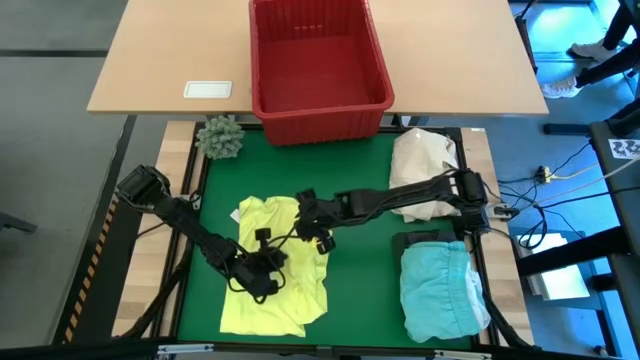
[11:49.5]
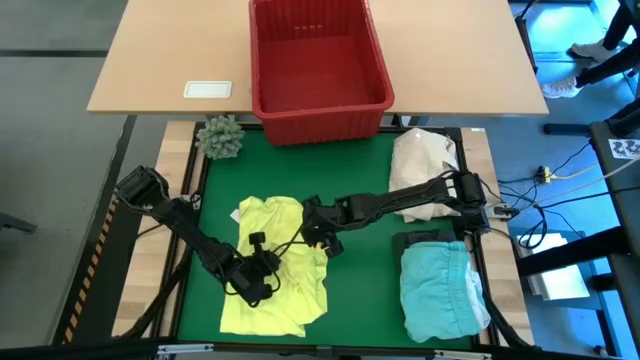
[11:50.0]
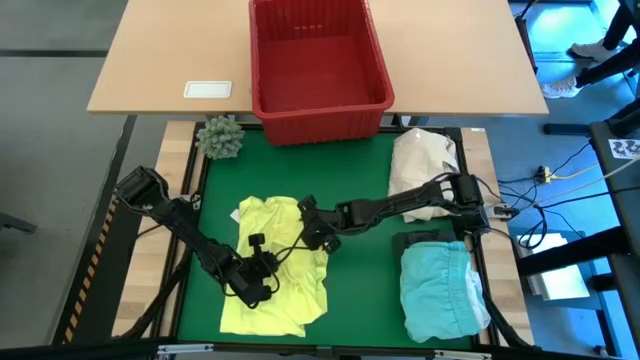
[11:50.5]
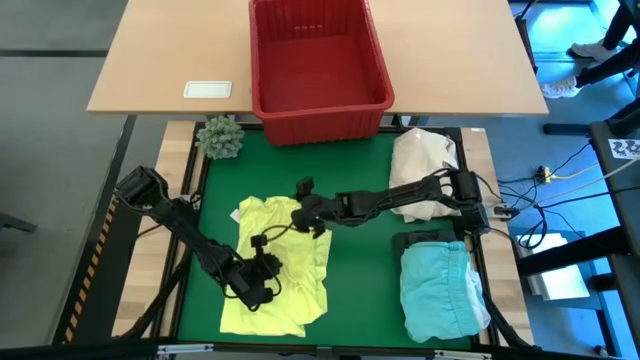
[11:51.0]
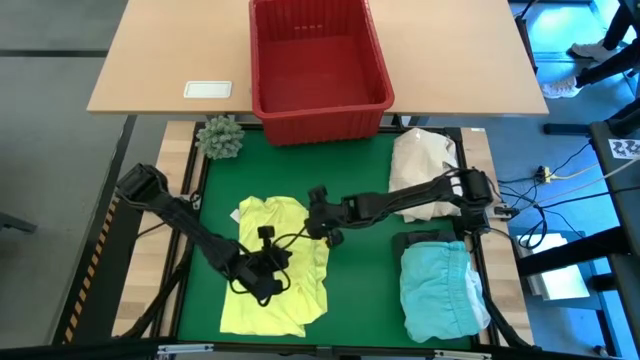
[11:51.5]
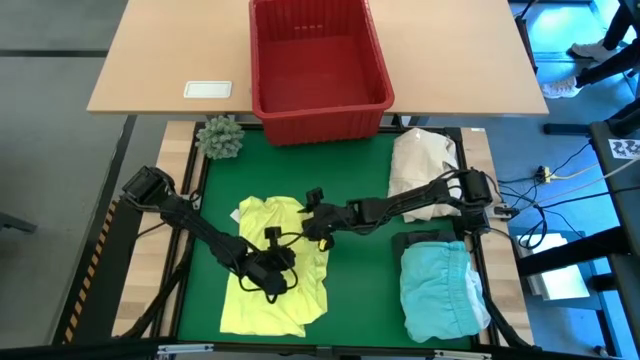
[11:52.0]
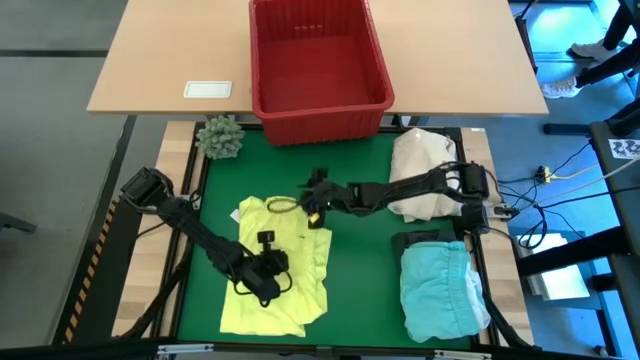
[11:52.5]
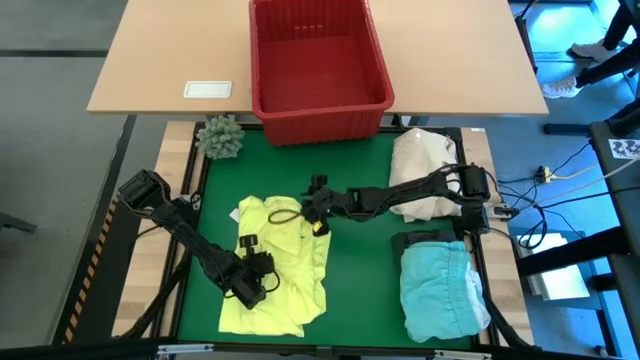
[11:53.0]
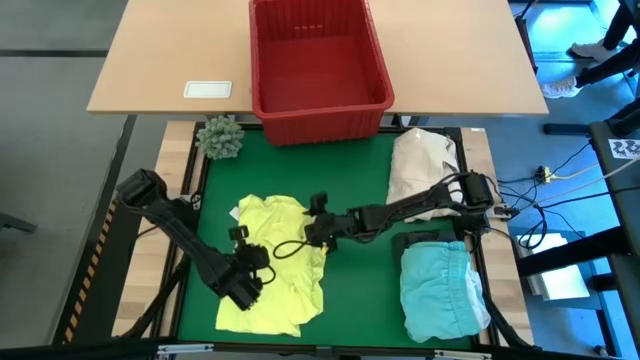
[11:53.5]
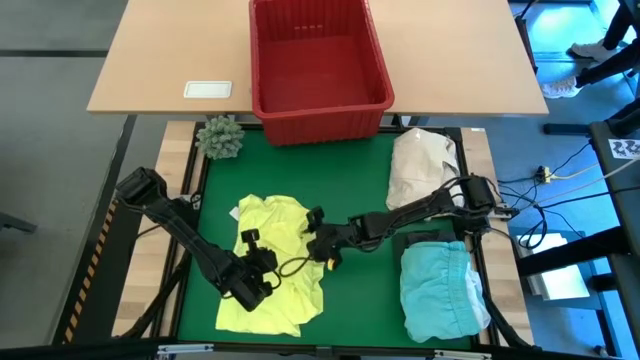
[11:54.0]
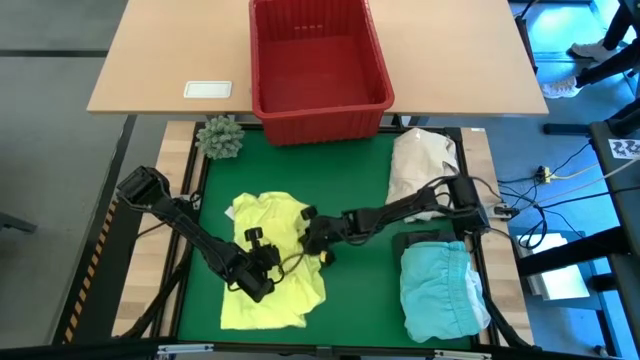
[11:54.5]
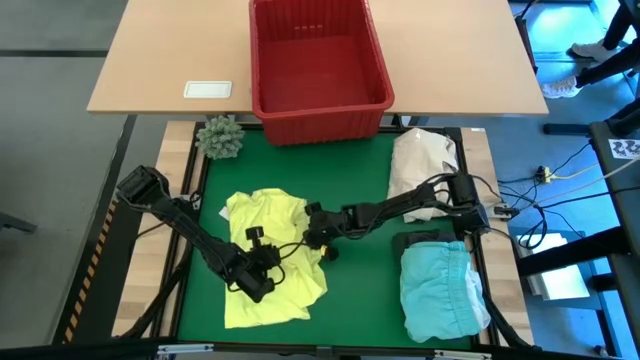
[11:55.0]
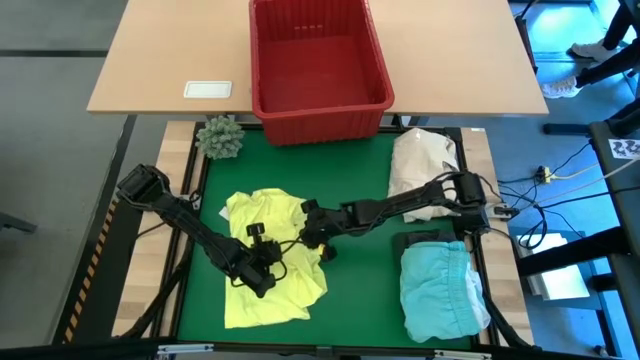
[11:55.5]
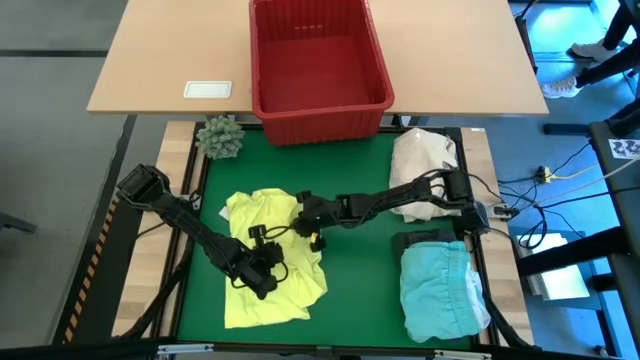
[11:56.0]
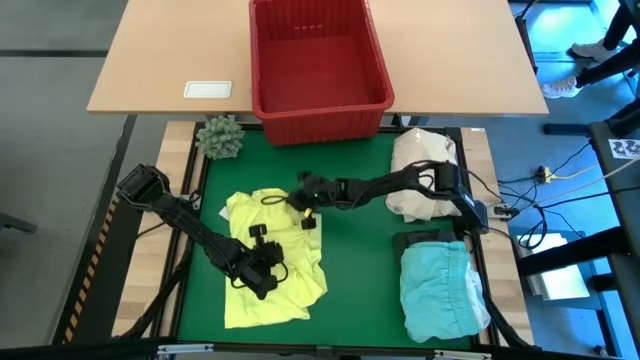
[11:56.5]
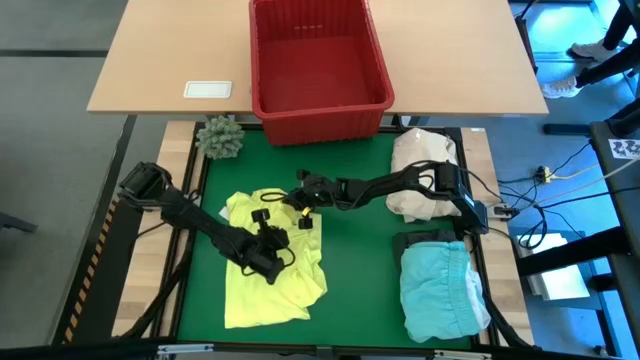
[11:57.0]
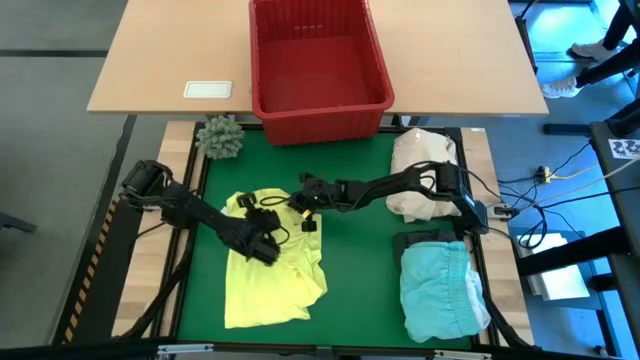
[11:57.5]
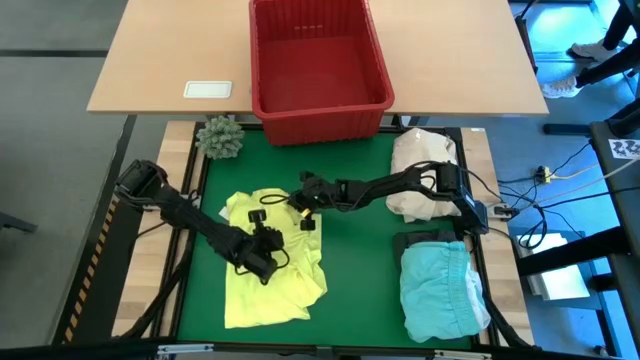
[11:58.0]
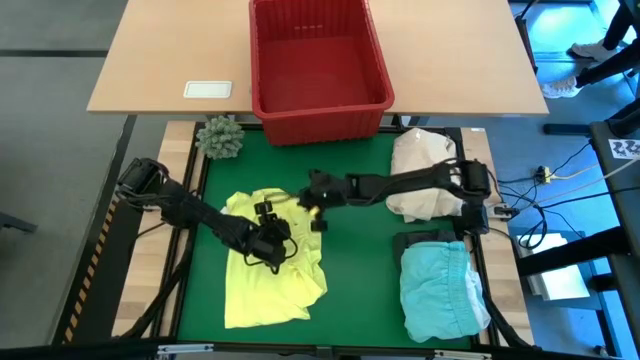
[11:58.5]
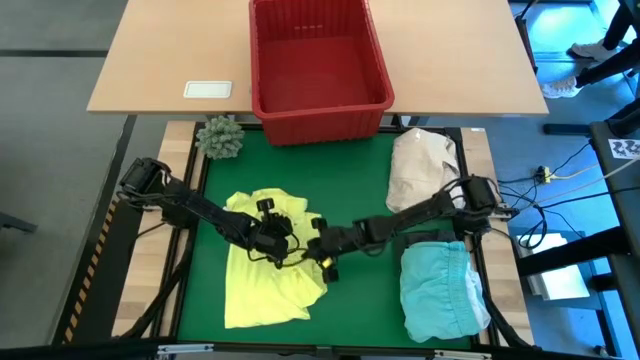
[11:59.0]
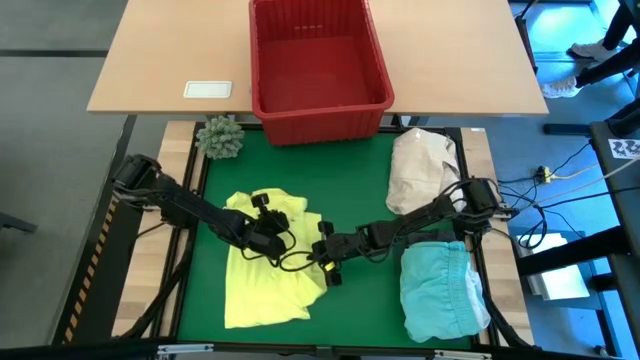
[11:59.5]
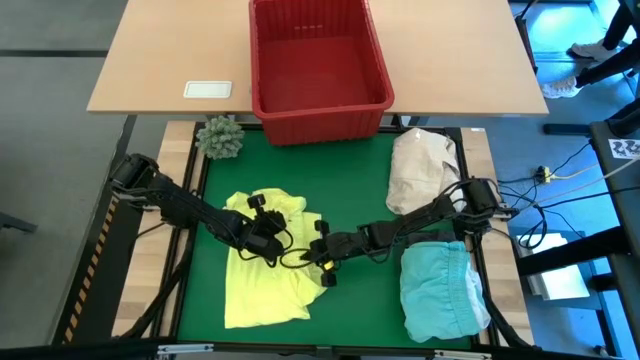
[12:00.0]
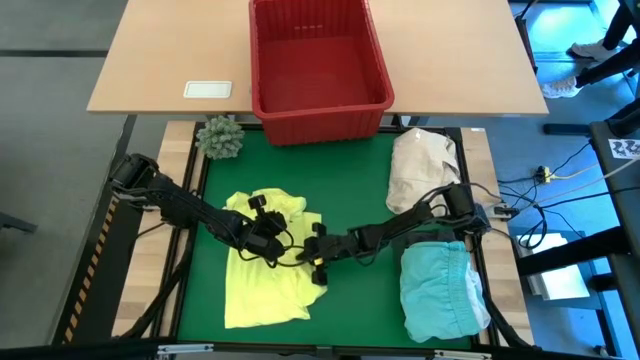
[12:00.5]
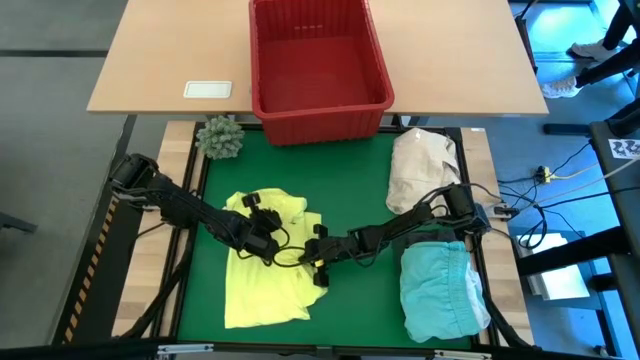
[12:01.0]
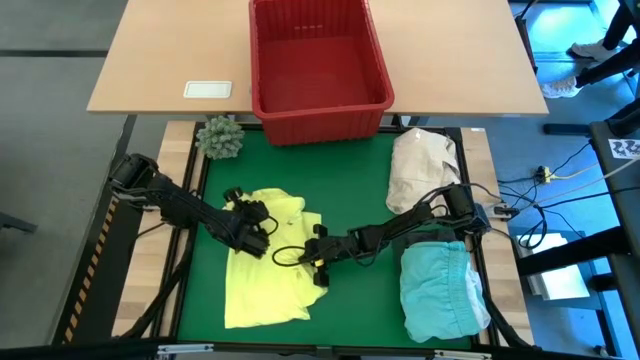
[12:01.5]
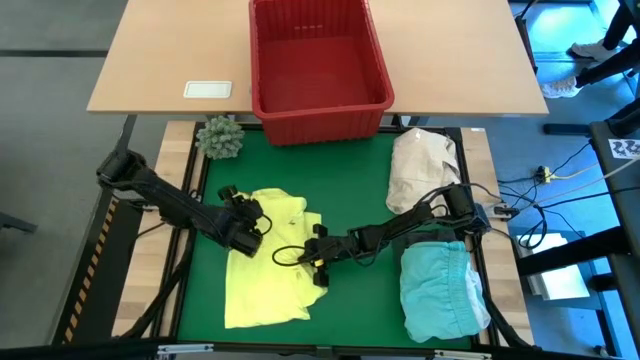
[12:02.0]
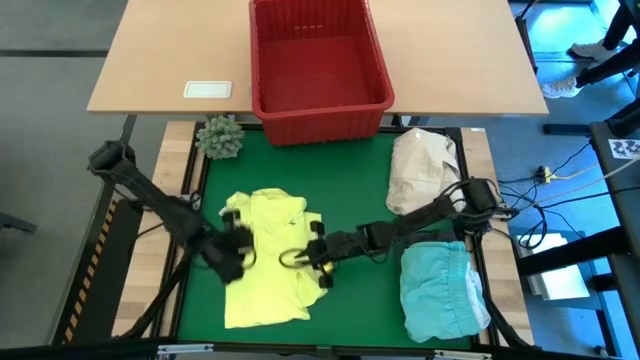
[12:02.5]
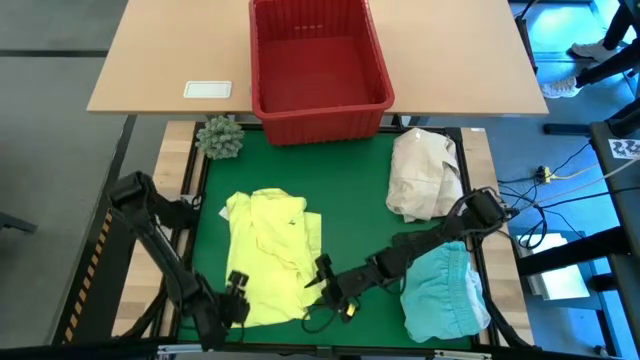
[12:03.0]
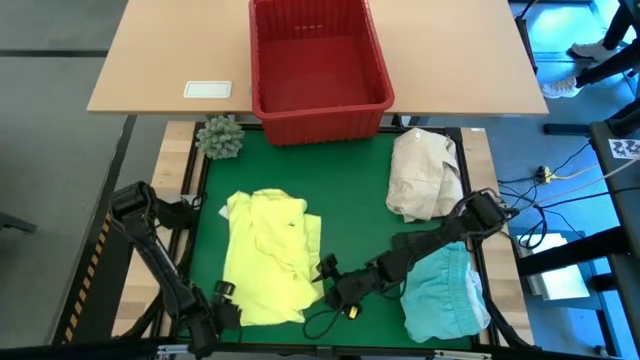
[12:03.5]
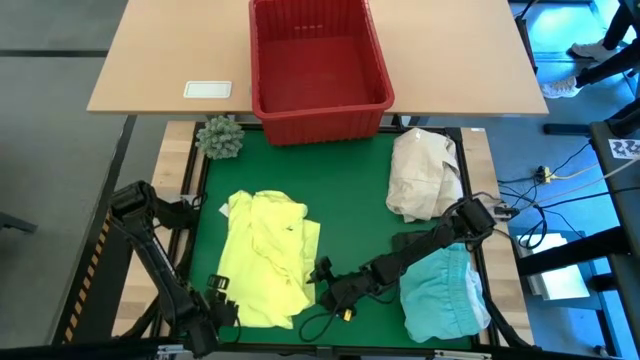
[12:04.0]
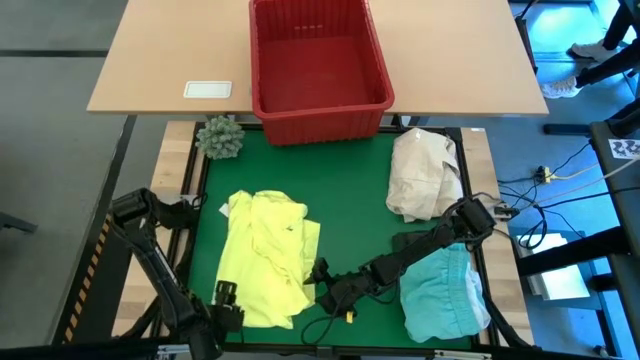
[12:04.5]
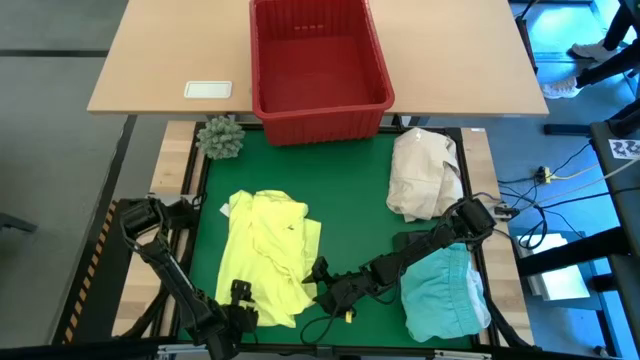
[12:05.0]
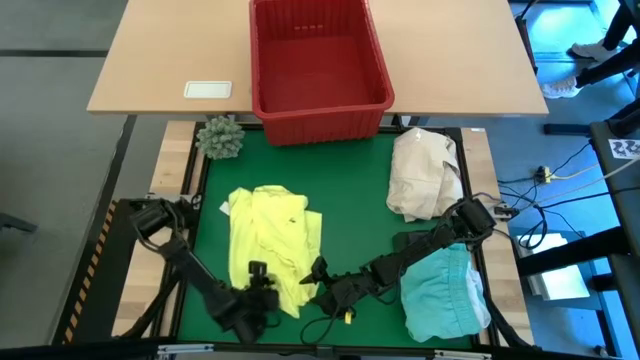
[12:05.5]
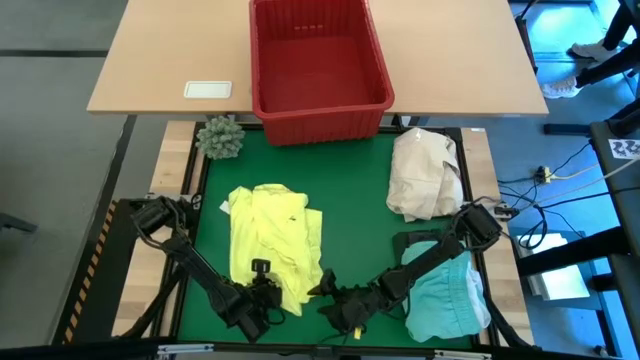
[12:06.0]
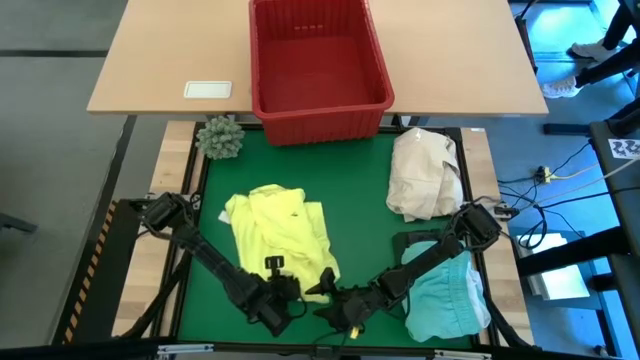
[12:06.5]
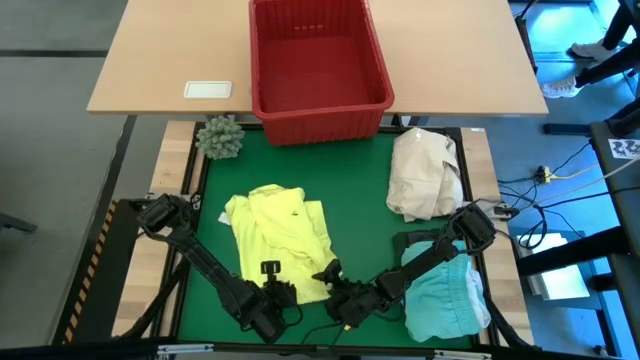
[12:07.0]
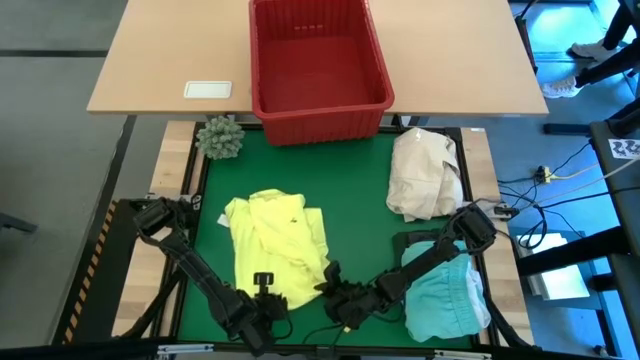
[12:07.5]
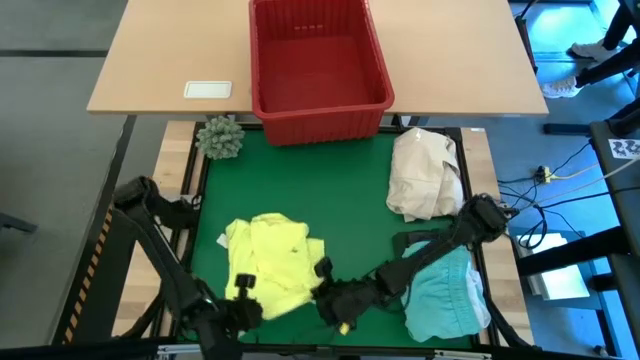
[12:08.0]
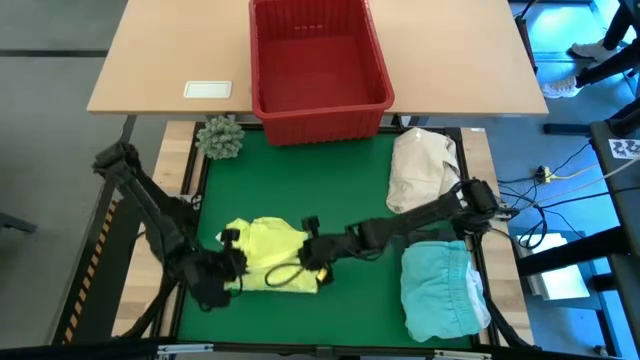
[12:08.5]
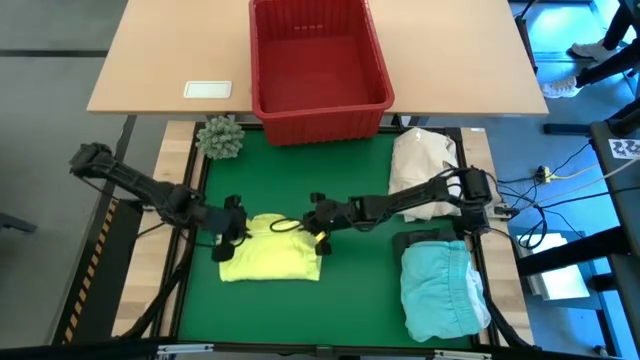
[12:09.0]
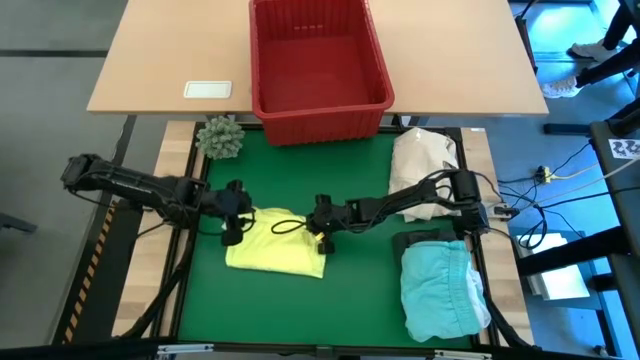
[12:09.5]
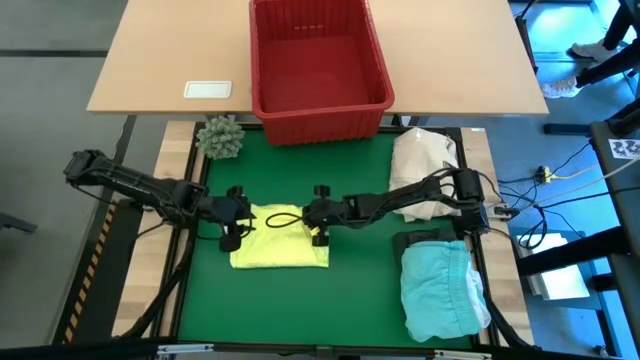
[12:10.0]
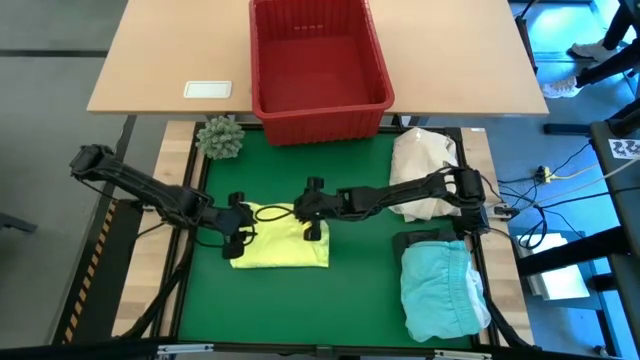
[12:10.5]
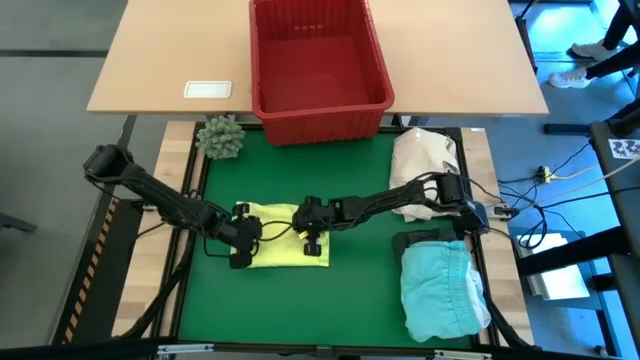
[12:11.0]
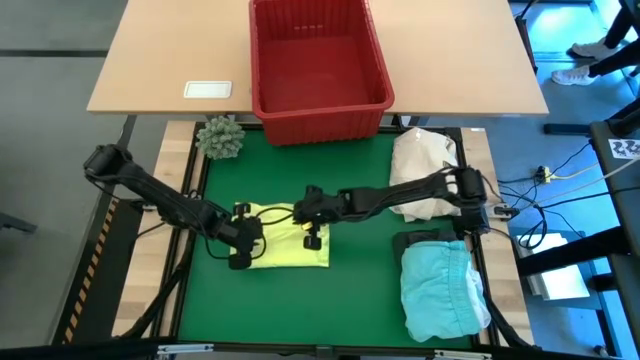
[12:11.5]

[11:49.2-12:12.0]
Task: Fold Laundry from Bin
Fold the yellow shirt
